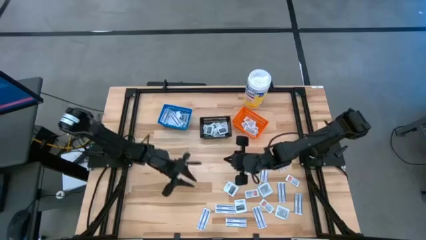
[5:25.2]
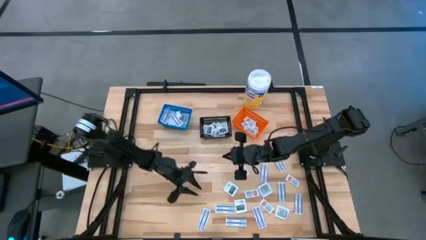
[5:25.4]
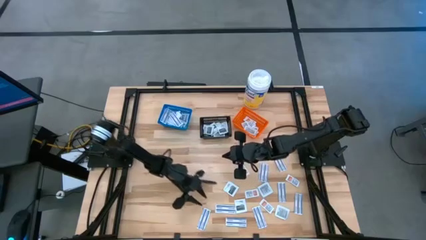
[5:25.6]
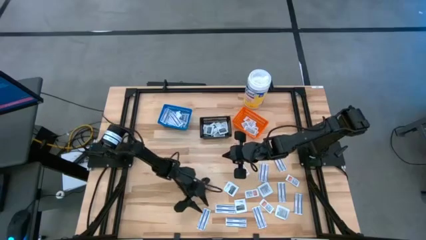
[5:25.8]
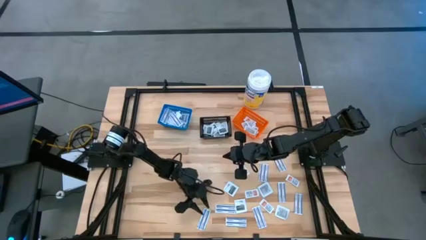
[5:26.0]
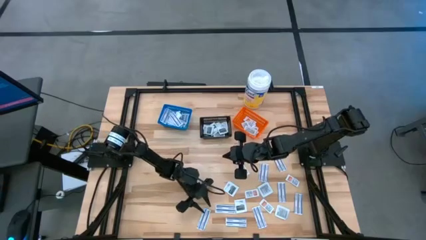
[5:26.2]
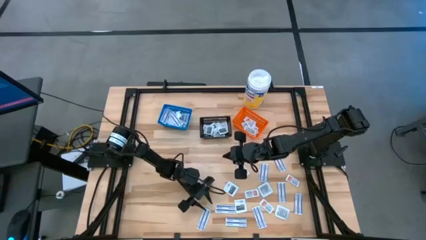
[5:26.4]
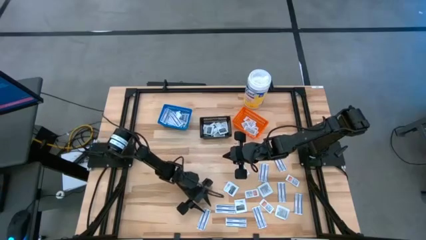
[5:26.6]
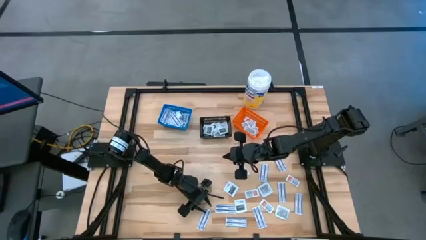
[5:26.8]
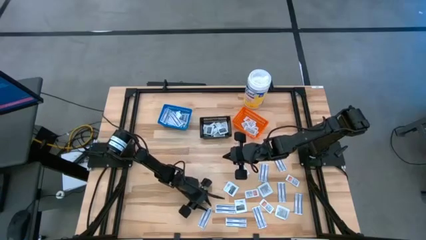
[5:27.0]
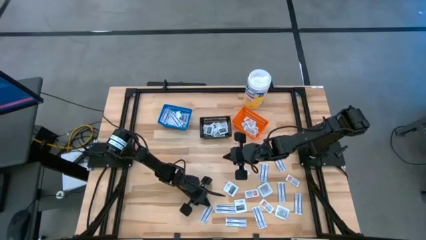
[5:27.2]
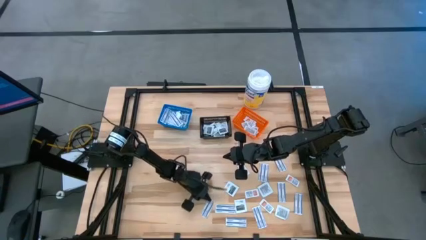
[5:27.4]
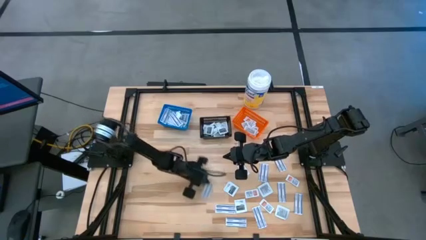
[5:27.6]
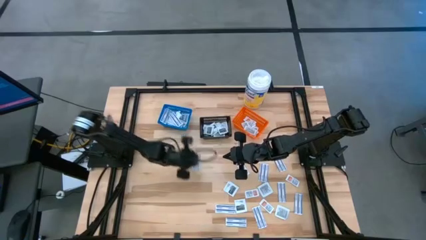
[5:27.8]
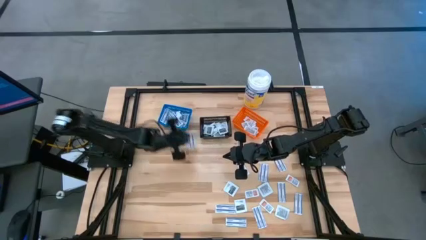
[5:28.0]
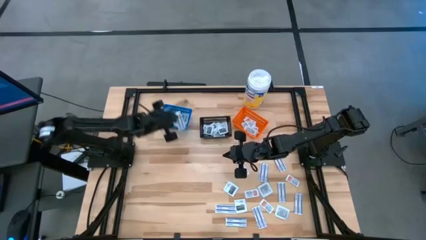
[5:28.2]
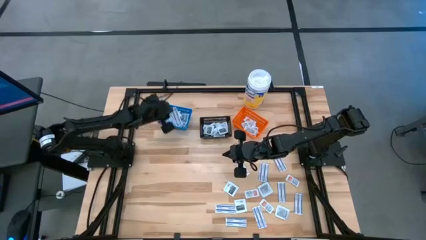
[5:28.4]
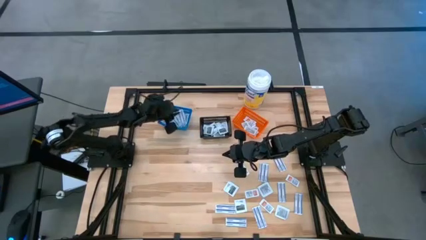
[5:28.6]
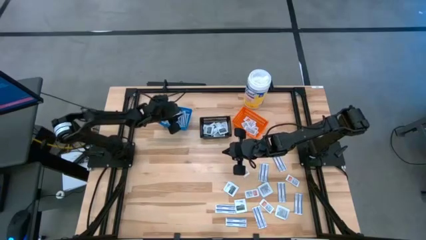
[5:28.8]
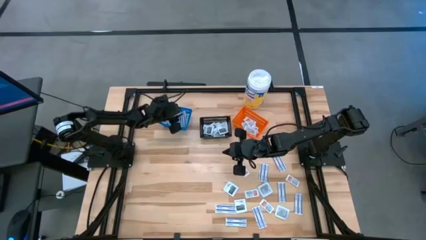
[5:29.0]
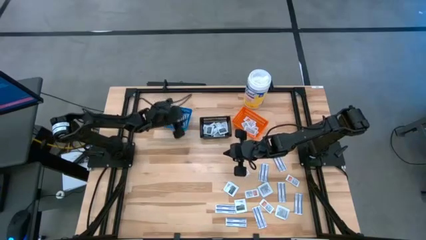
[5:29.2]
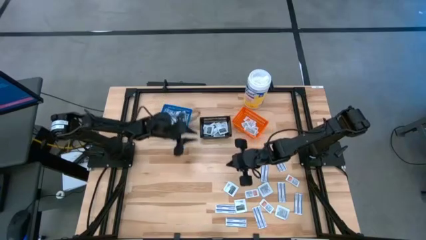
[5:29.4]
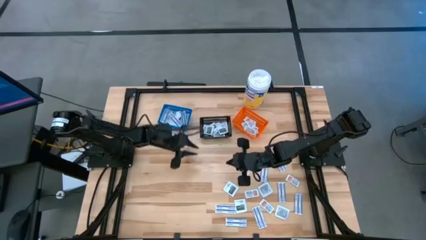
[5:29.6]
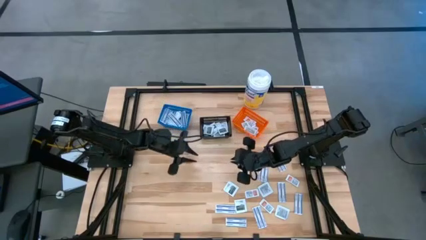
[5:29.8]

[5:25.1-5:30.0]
Task: Pick & Place First Aid Supplies
Put the bandage into the blue container

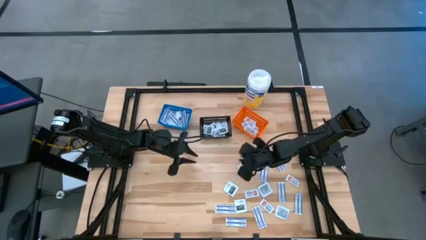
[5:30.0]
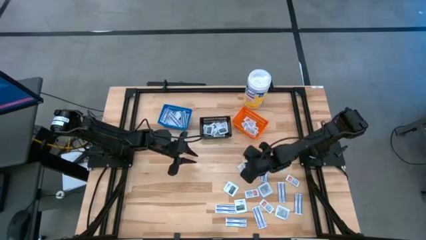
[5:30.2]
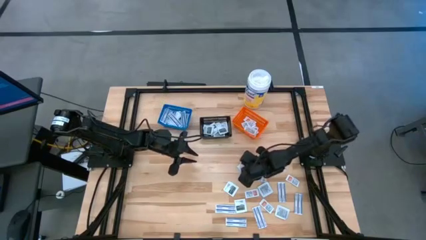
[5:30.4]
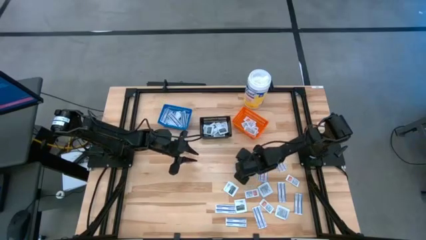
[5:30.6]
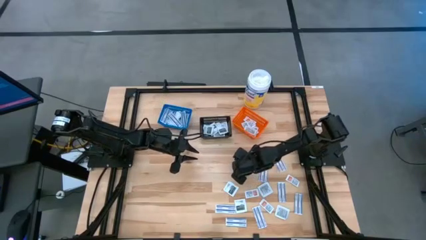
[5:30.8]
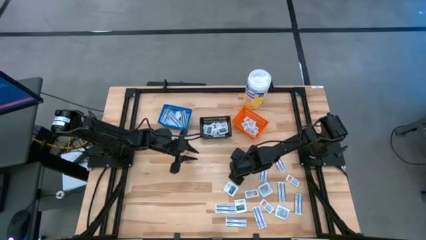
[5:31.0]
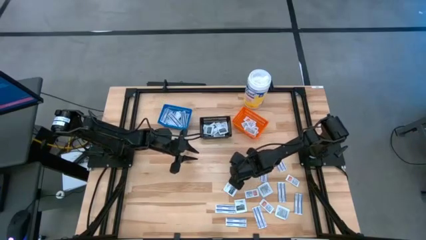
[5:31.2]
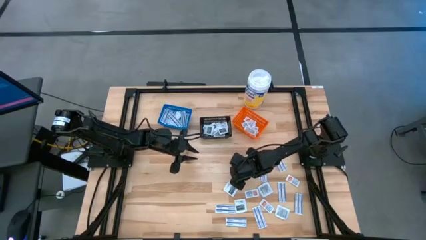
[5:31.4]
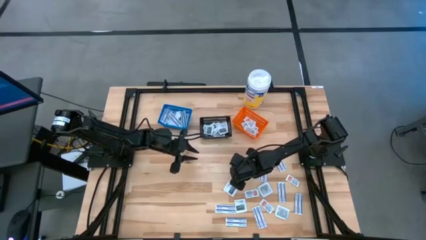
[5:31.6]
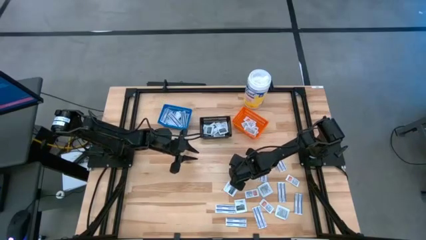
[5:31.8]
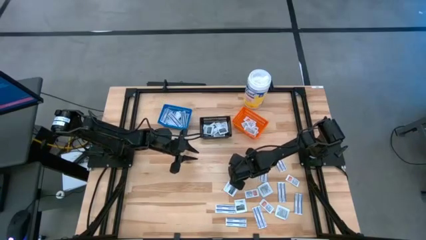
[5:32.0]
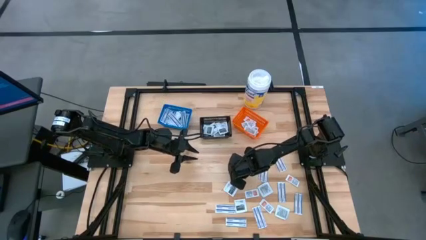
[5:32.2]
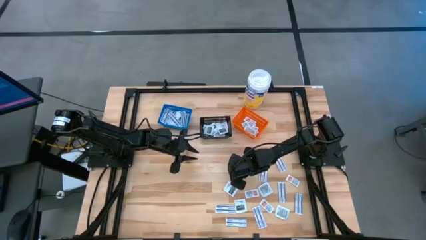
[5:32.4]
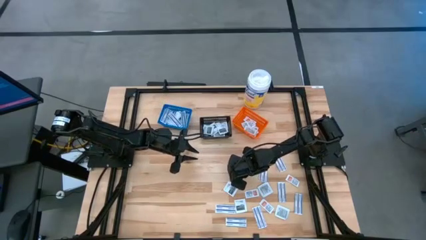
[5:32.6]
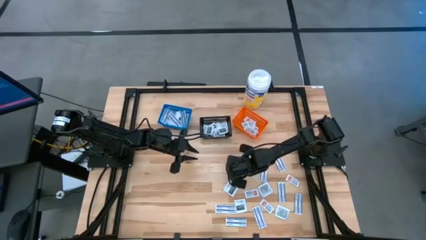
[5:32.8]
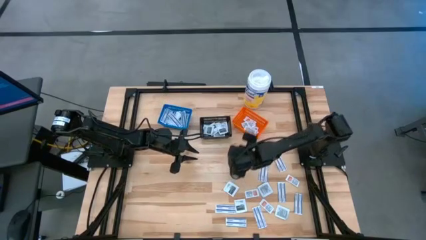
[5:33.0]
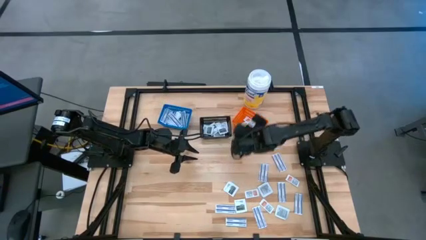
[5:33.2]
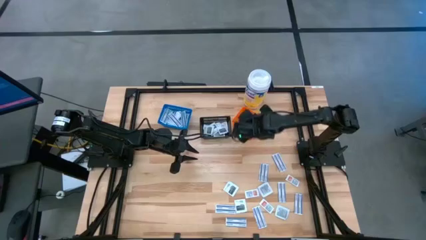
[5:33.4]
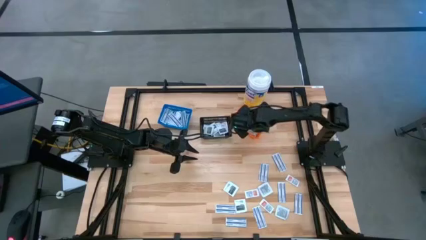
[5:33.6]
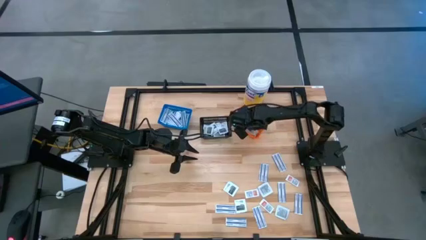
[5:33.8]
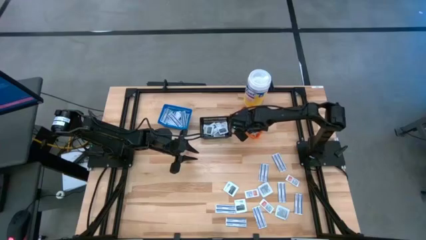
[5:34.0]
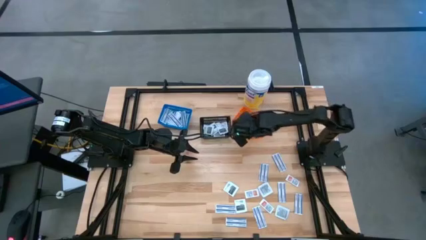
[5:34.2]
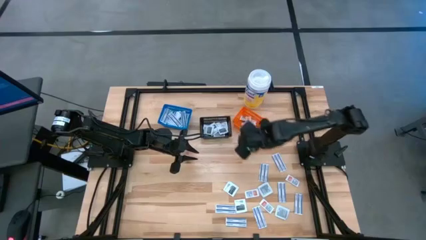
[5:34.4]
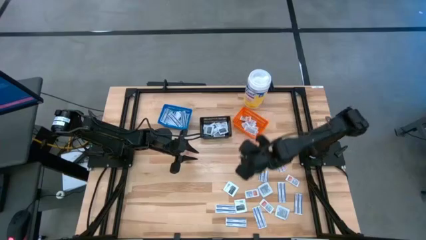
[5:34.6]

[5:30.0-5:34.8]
Put the ointment pack into the orange bin

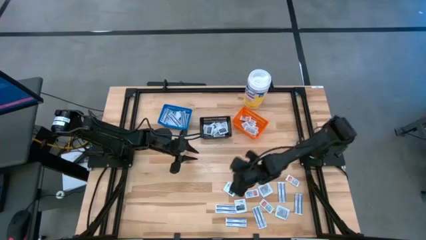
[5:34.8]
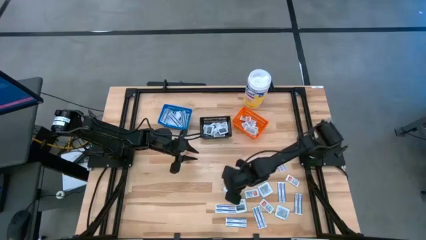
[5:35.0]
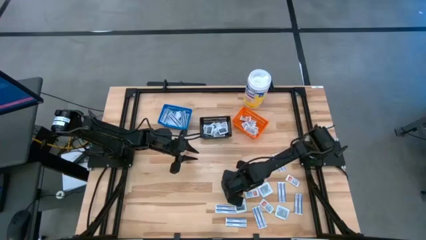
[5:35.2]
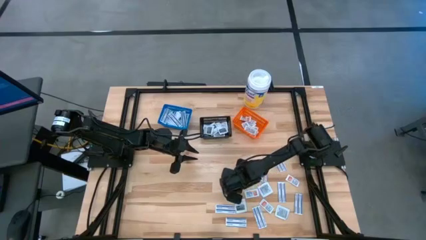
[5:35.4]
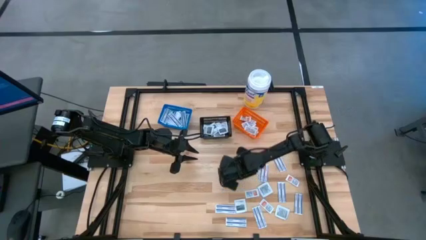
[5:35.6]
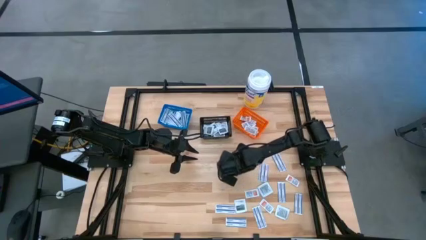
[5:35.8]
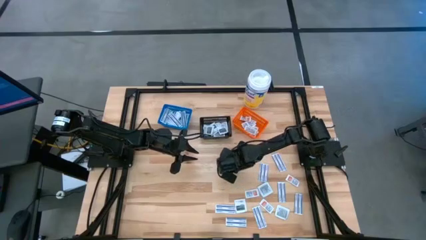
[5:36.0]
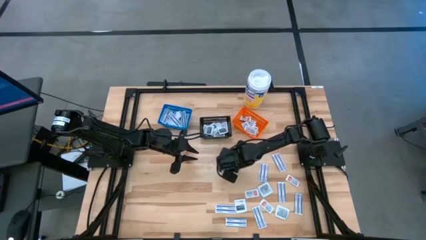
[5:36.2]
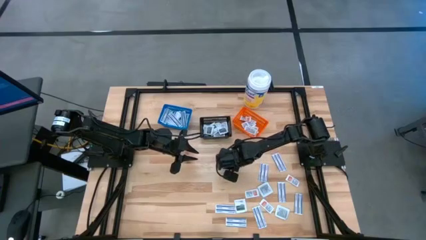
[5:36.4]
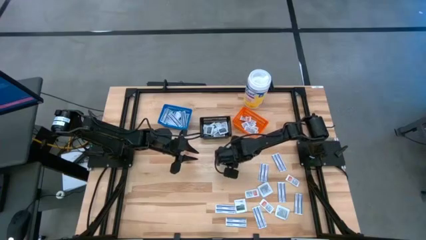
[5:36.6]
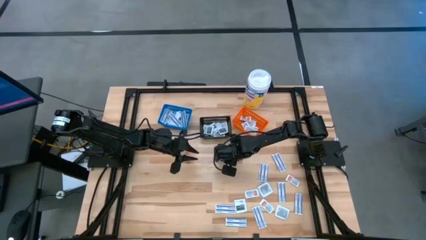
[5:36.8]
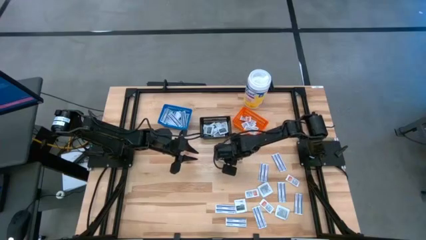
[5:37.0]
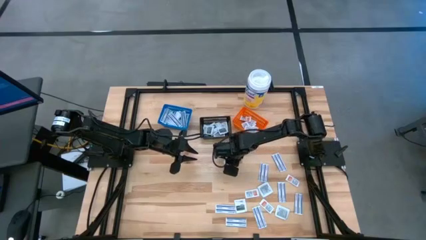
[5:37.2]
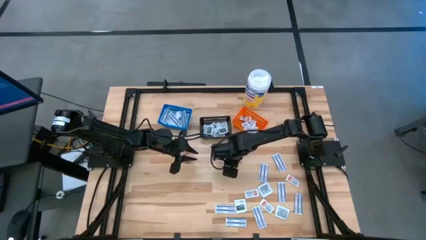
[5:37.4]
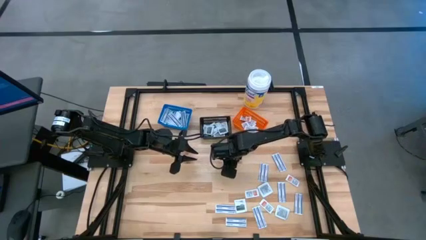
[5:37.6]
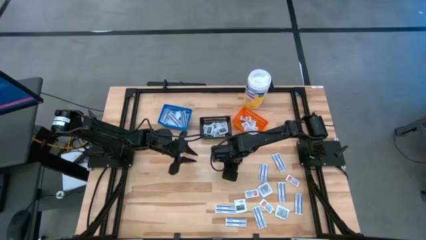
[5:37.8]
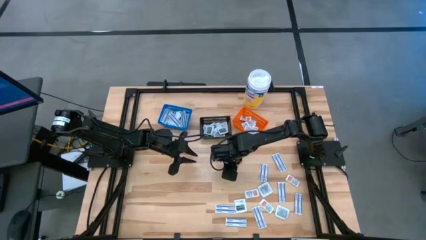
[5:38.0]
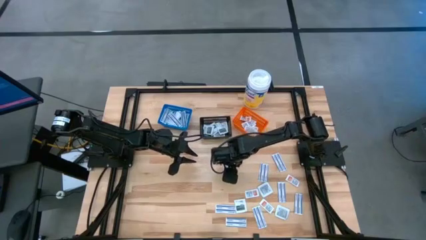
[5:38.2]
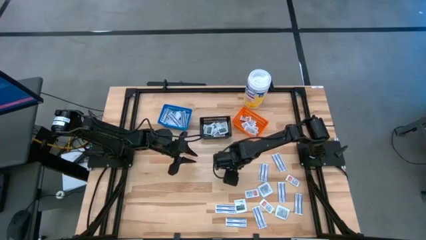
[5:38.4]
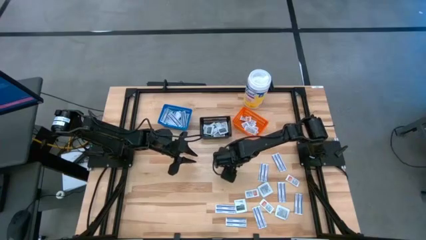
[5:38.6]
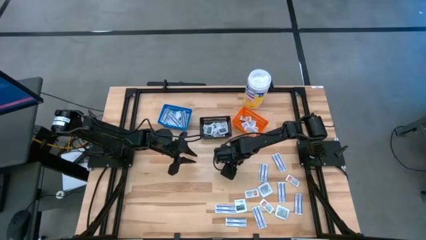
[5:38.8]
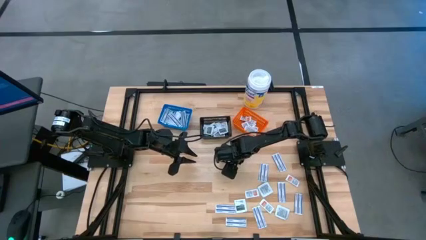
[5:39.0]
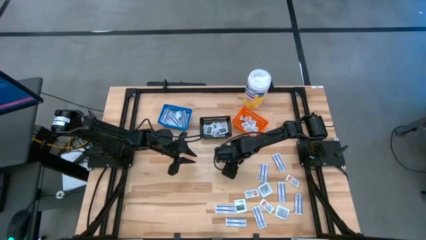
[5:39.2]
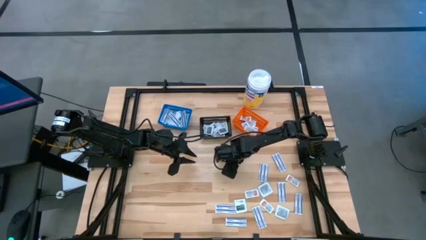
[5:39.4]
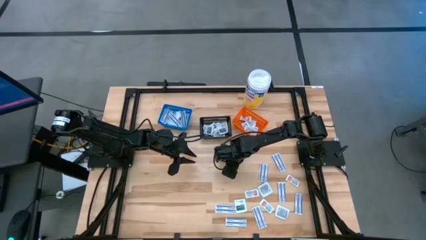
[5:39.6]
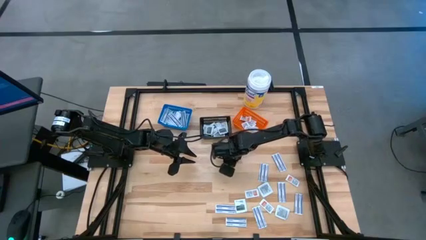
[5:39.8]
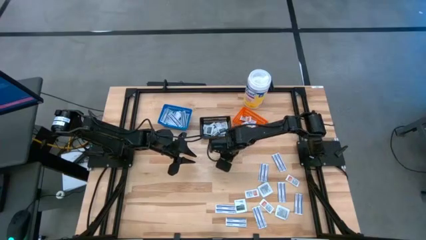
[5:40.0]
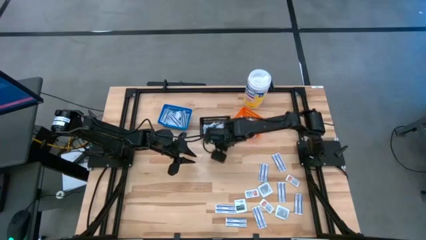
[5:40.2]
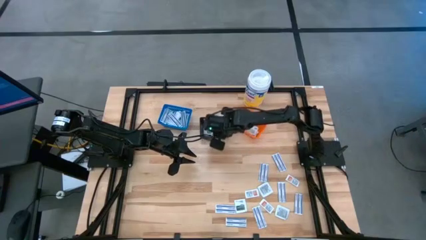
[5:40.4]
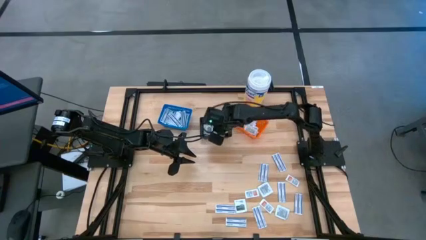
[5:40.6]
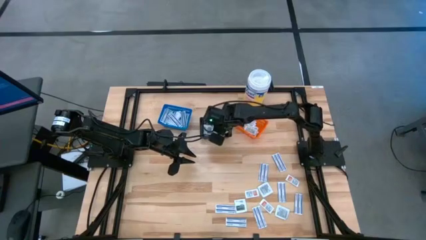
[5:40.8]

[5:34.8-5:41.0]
Put the towelette pack into the black bin

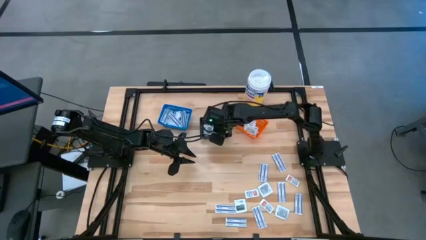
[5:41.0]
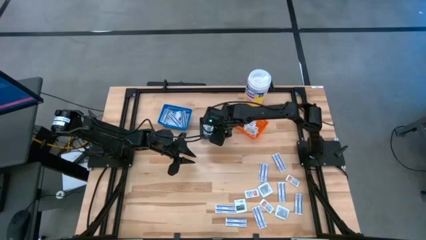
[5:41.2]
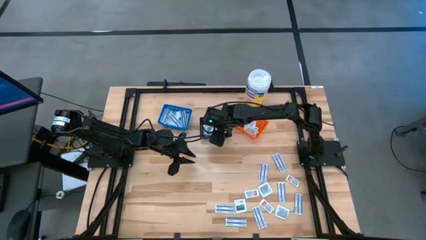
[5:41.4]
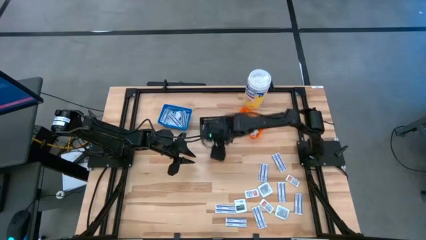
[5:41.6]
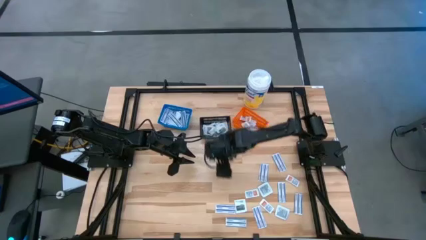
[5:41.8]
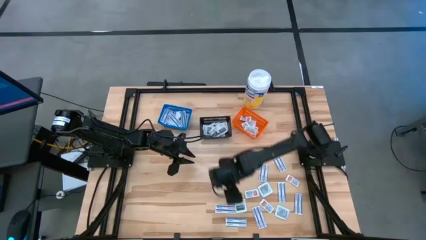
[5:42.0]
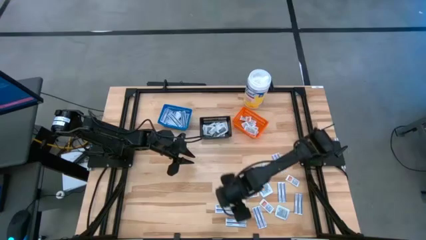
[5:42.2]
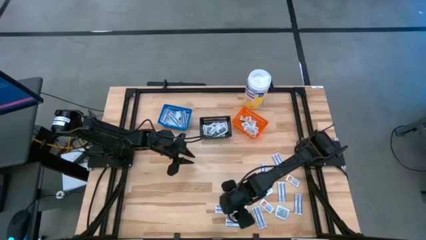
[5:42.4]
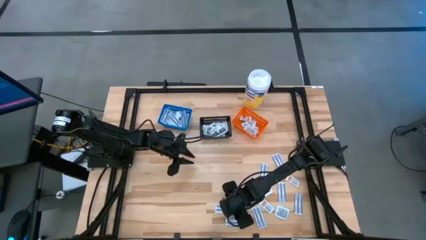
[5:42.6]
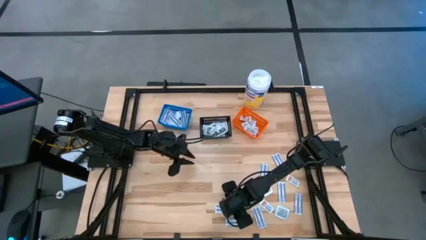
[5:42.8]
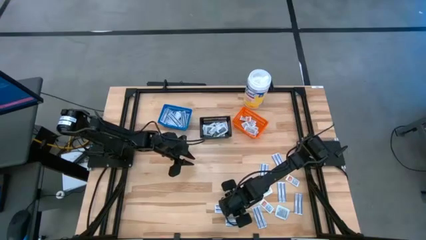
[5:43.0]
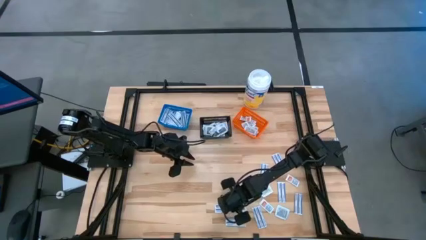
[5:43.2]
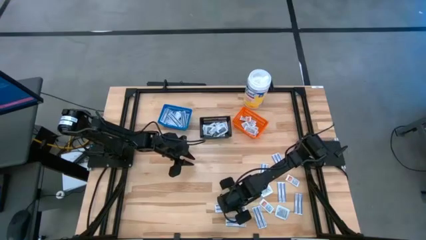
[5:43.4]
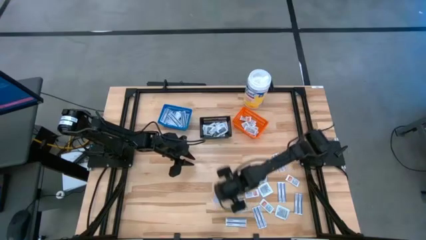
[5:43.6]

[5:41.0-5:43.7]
Put the bandage into the blue container
